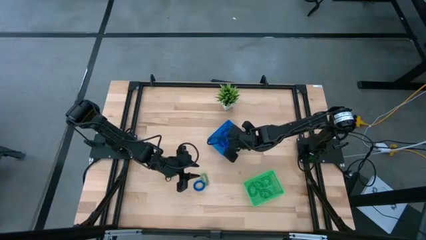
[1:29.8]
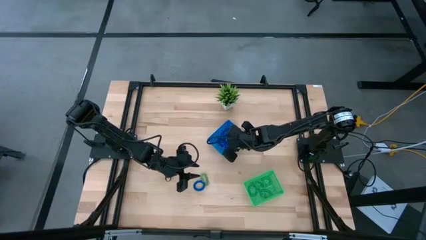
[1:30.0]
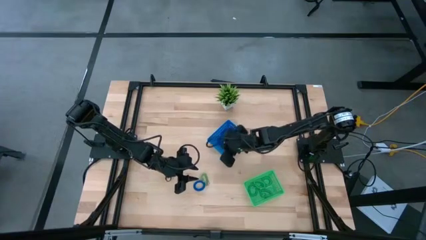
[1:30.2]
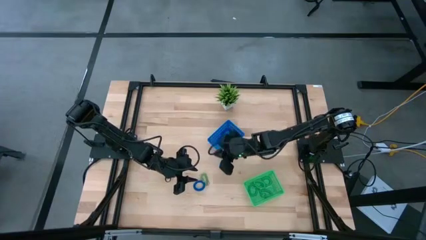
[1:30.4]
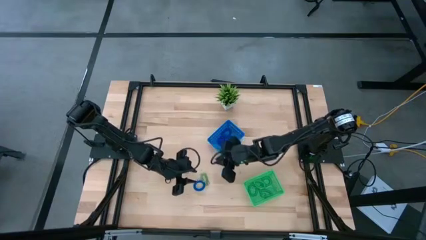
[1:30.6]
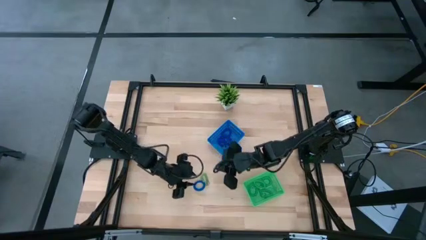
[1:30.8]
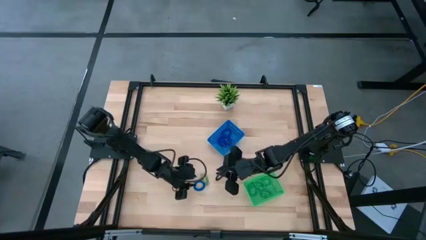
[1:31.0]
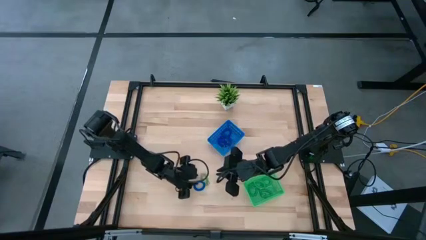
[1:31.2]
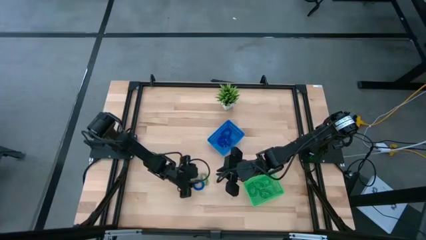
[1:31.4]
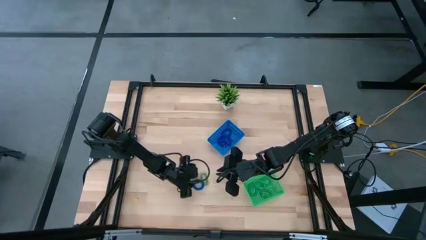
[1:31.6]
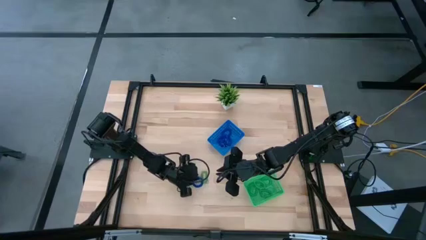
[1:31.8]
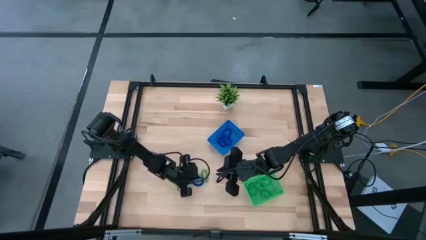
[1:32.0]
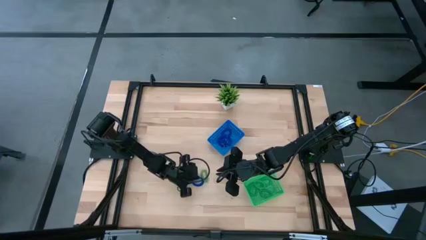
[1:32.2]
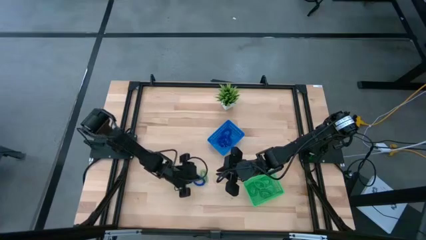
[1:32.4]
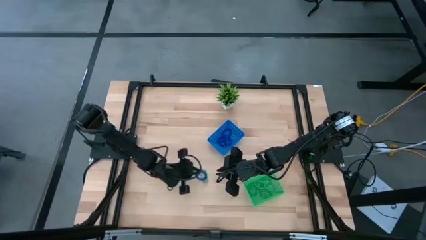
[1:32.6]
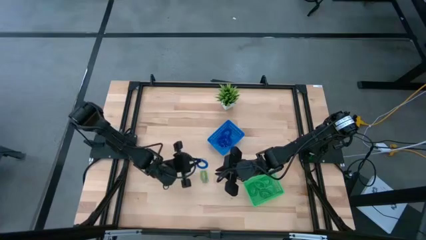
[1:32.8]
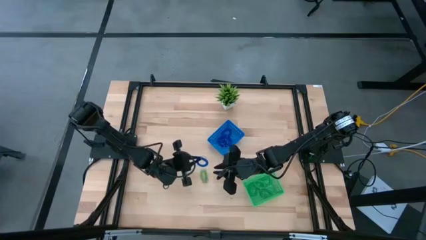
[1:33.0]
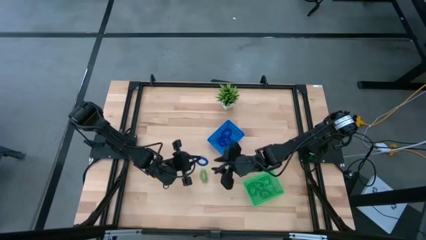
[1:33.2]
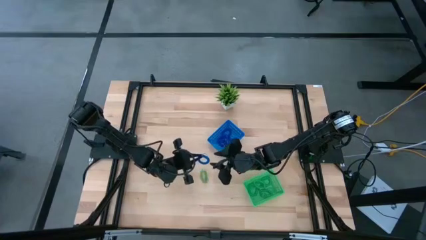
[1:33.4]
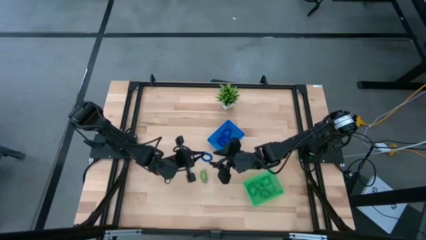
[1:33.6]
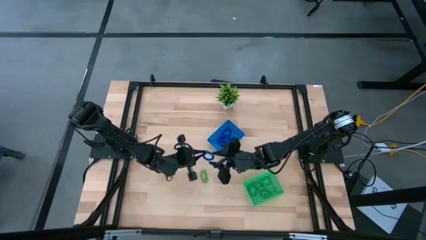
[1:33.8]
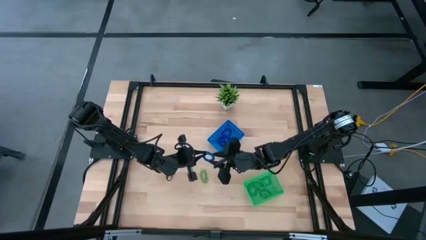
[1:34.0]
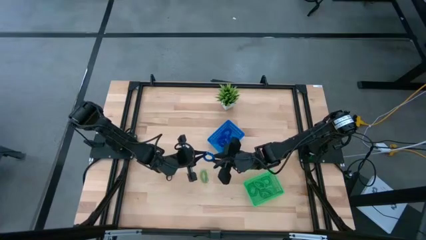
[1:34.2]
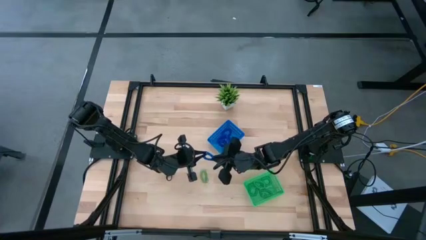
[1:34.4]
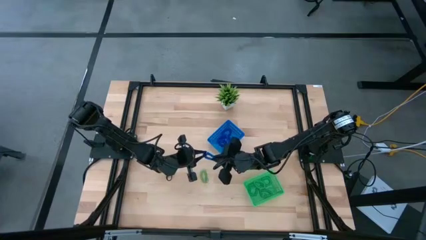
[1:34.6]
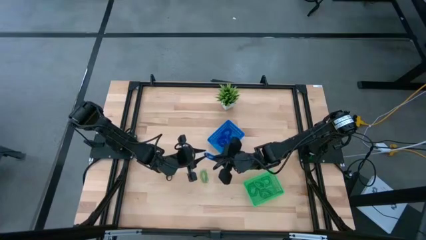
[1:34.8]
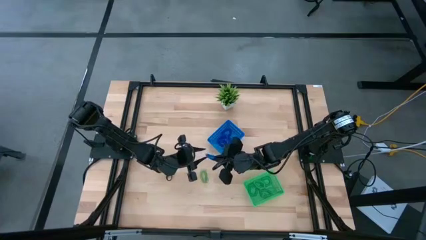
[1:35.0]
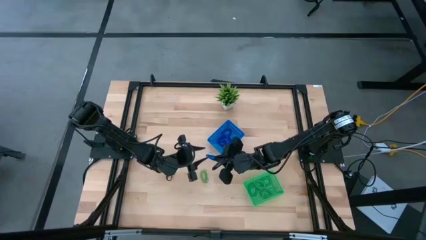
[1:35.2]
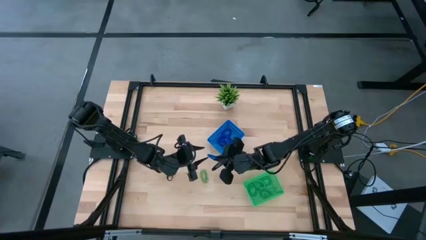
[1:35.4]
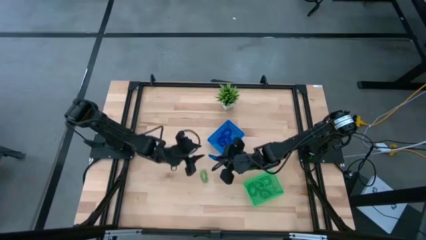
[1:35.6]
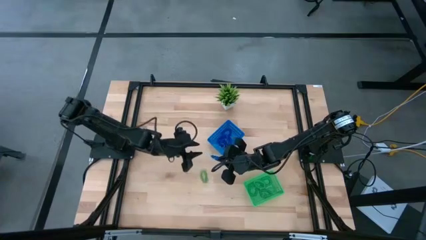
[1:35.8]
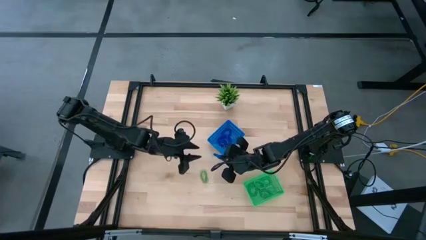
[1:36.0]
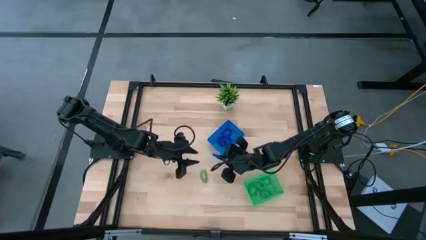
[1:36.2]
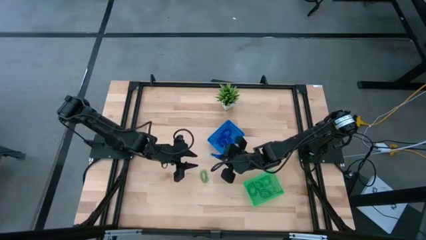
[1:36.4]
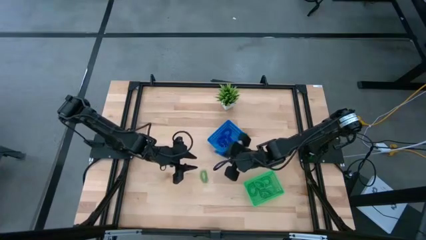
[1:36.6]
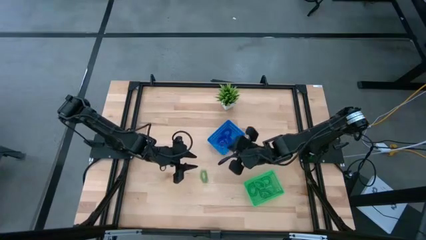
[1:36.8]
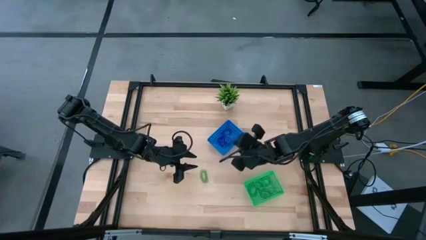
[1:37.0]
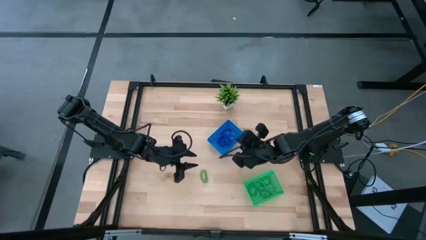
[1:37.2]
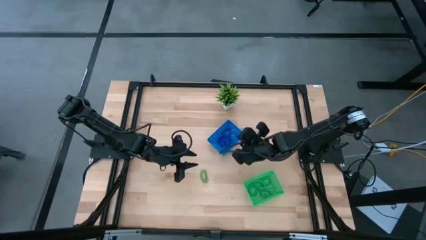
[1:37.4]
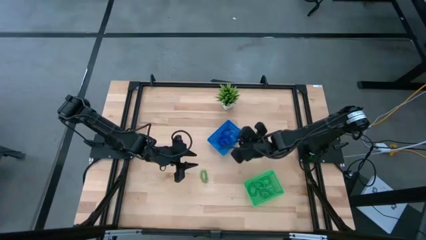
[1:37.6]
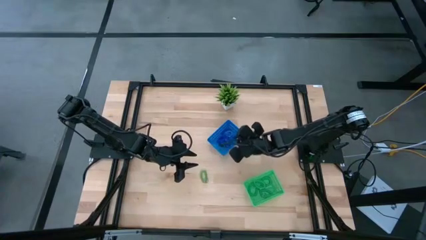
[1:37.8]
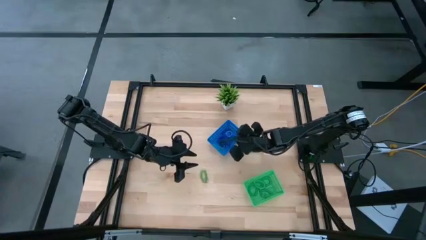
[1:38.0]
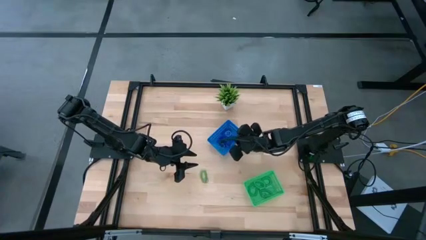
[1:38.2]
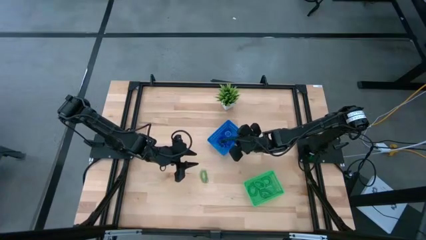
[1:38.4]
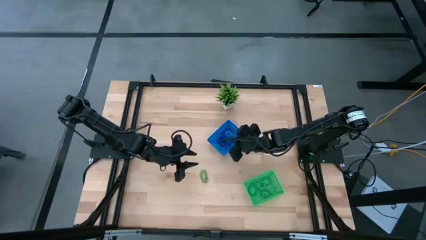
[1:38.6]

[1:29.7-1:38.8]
Task: Sort spring keychains
Put the blue spring keychain into the blue bin

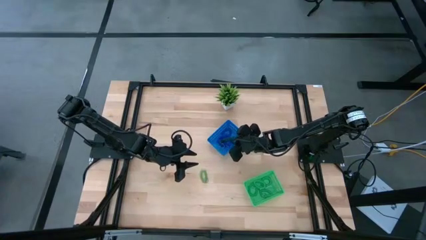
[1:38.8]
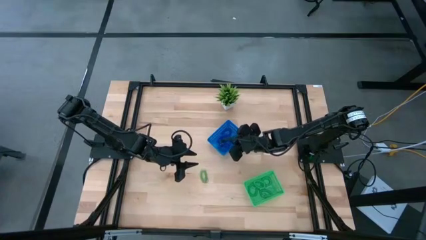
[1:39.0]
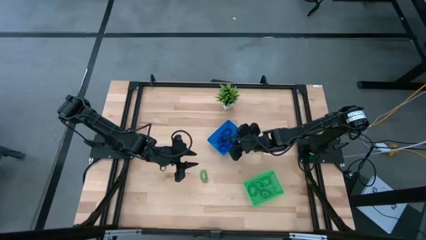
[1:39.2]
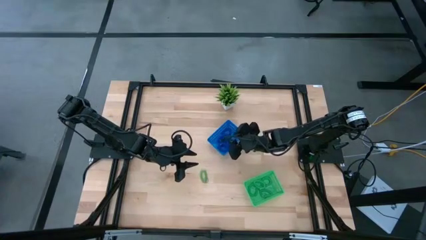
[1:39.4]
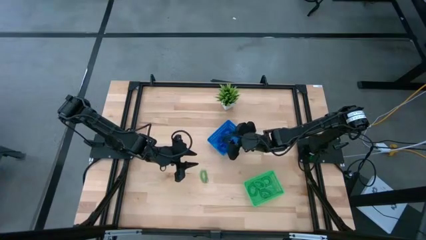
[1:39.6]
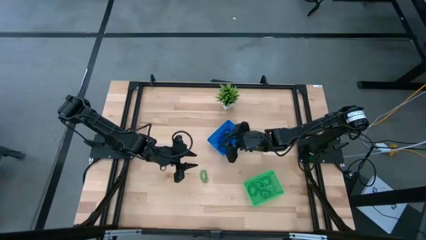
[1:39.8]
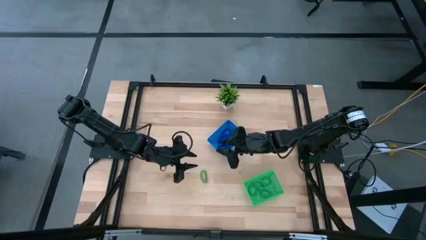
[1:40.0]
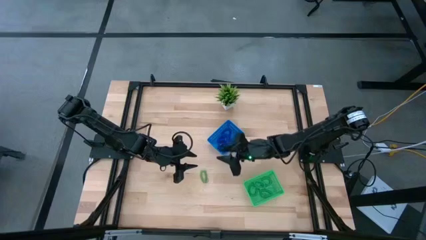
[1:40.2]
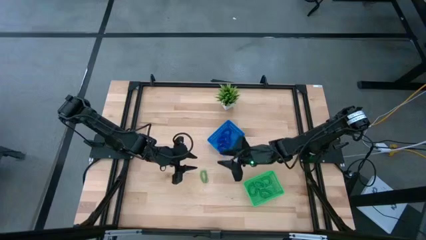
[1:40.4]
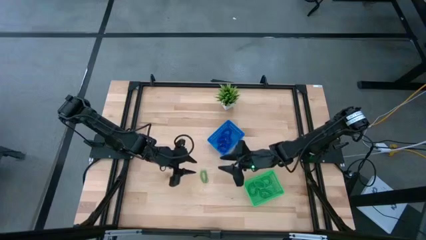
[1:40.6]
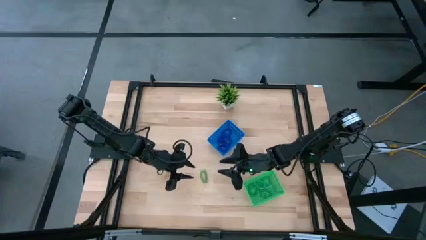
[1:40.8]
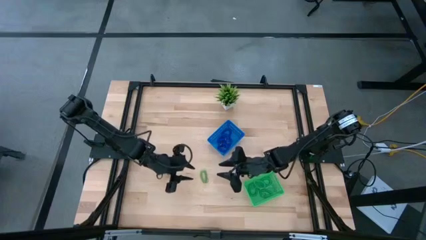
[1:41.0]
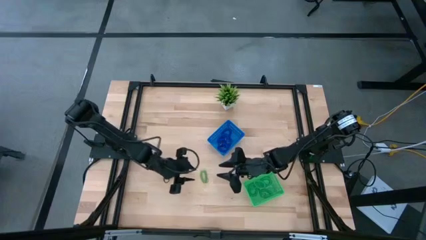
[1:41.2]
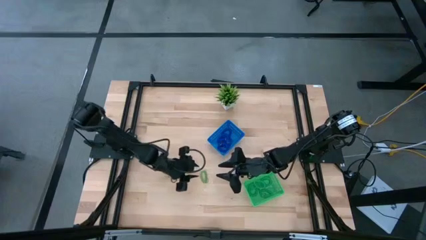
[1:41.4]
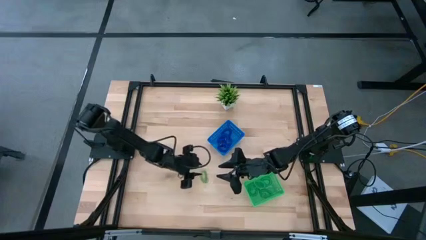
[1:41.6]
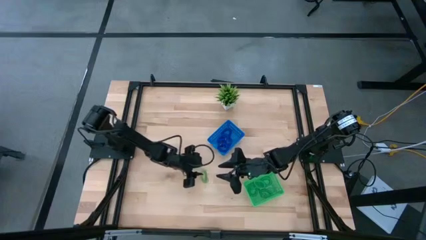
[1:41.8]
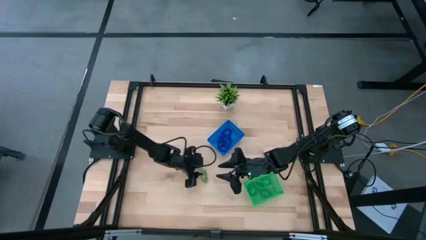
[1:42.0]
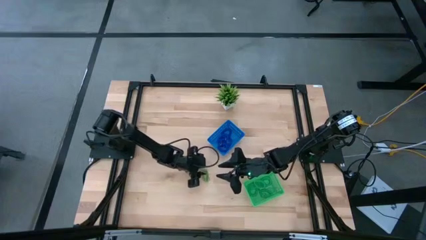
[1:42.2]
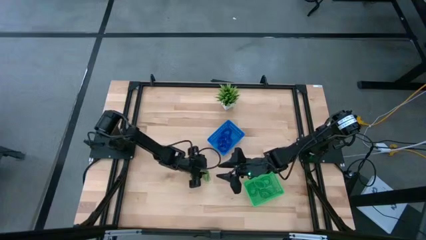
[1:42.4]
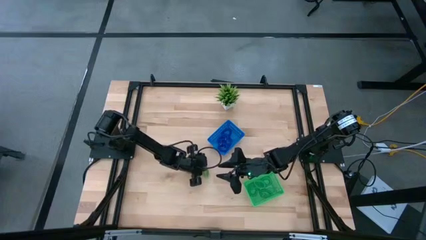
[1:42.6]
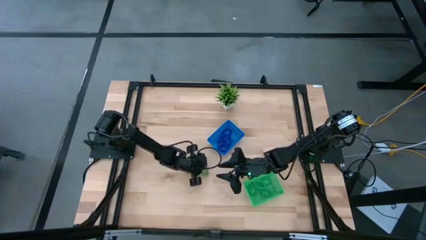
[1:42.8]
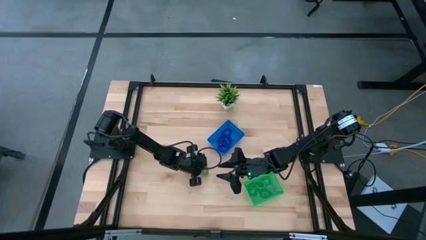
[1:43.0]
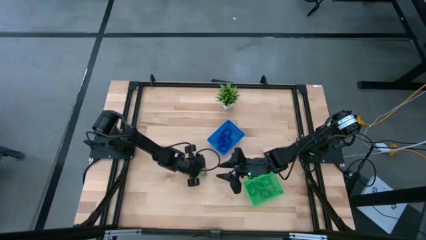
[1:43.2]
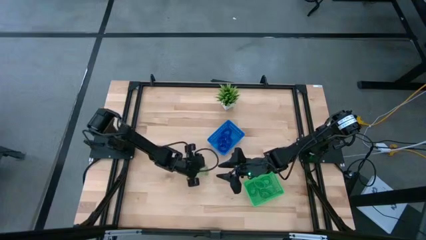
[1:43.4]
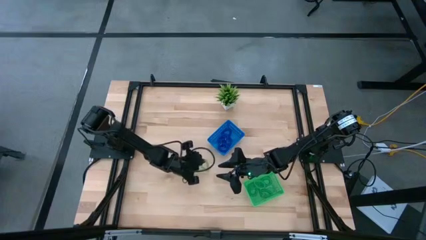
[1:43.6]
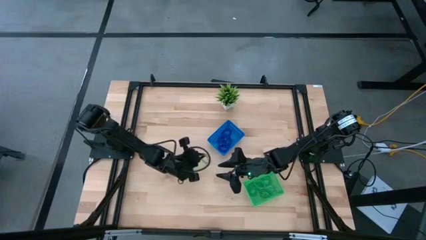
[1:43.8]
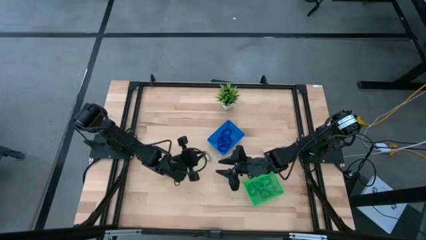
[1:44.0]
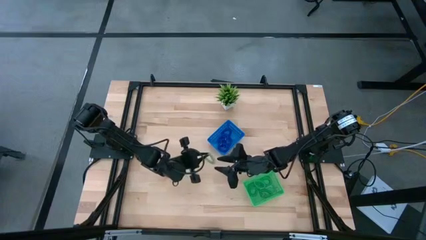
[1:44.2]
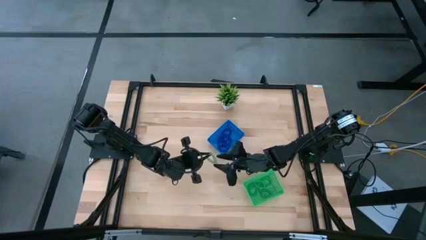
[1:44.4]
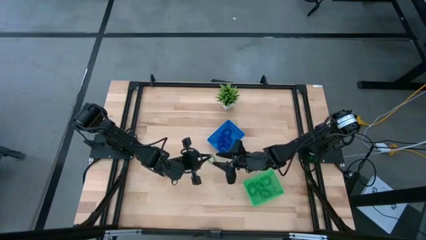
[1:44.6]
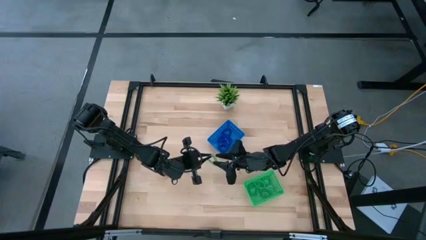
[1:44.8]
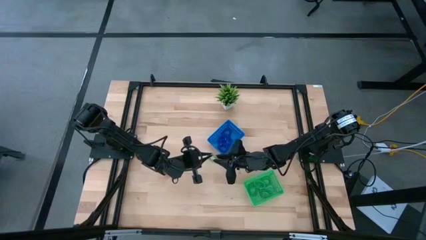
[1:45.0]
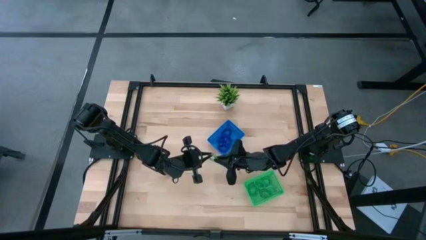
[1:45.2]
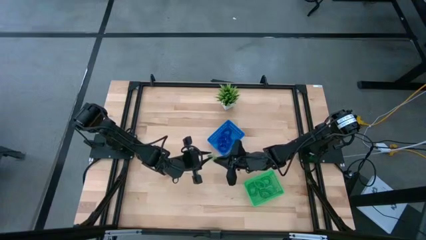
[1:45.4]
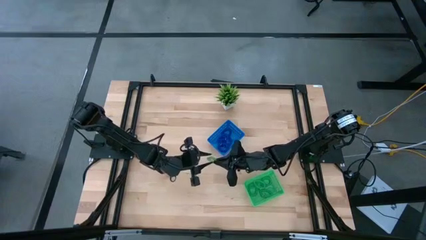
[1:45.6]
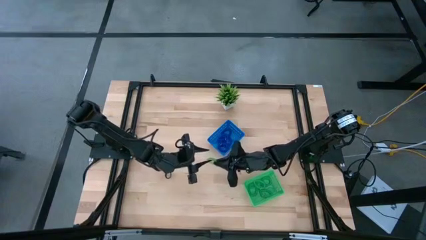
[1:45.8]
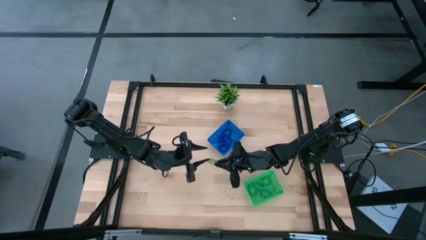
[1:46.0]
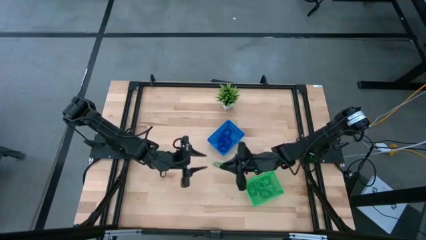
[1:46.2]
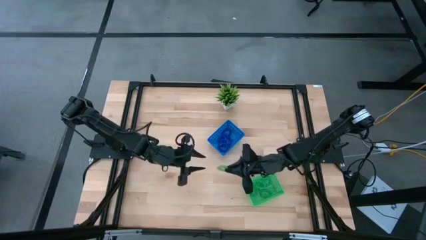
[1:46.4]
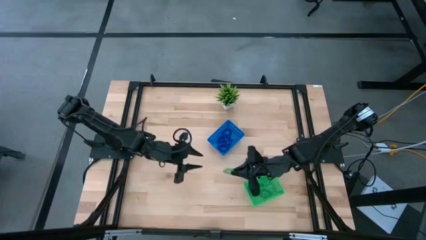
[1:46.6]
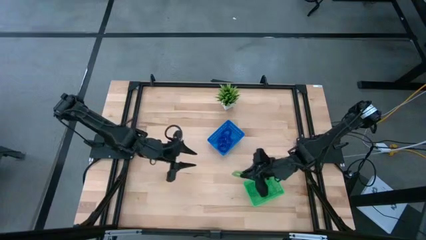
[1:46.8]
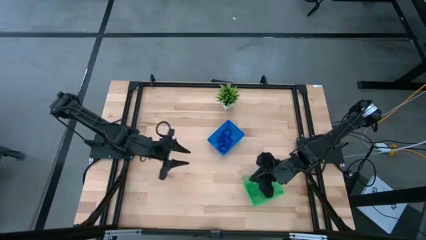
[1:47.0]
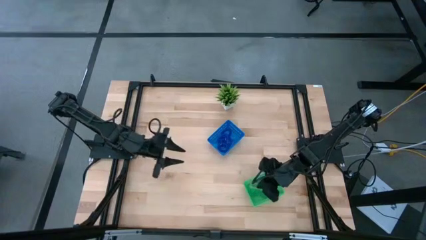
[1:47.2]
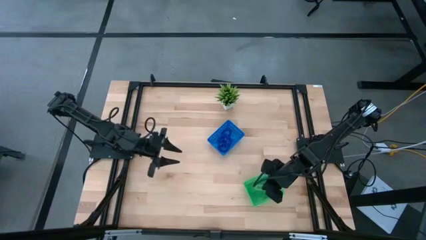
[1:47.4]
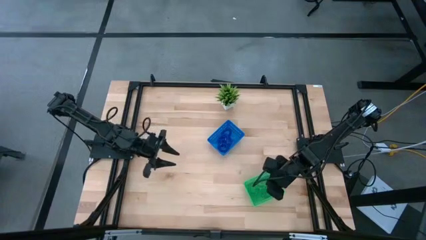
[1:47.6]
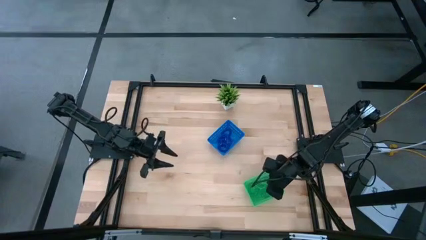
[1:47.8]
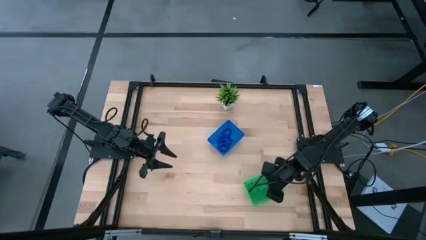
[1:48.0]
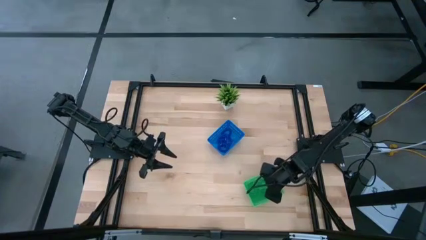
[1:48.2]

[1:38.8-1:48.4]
Put the green spring keychain into the green bin
